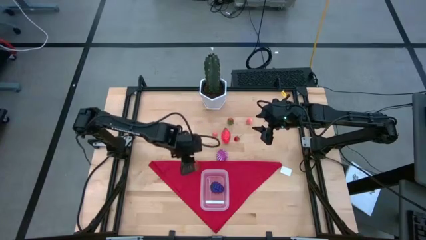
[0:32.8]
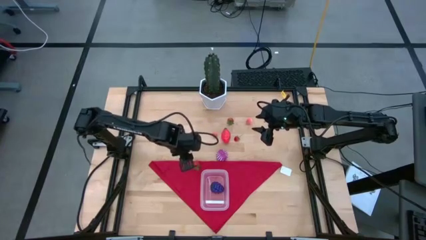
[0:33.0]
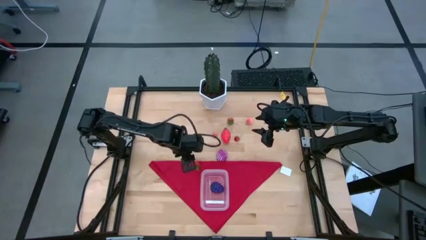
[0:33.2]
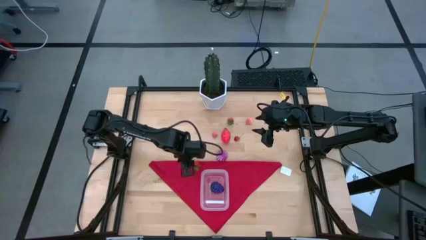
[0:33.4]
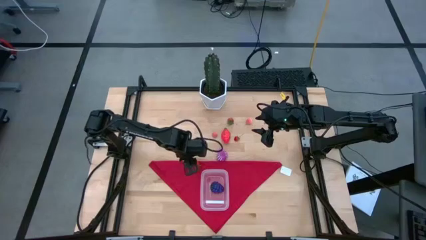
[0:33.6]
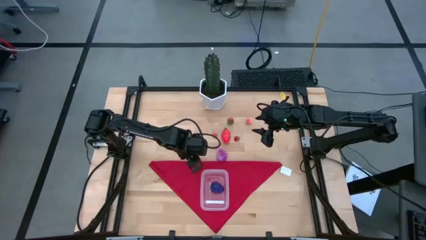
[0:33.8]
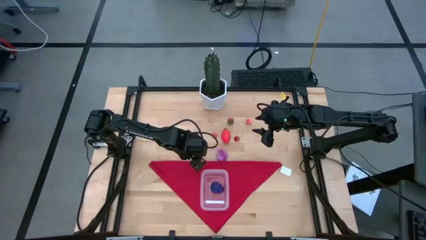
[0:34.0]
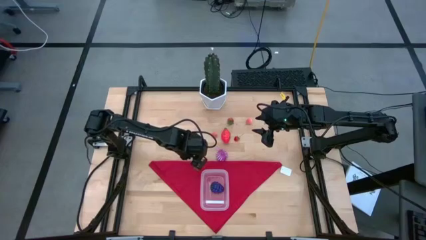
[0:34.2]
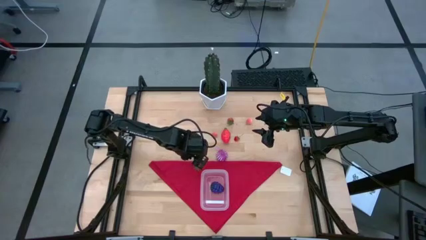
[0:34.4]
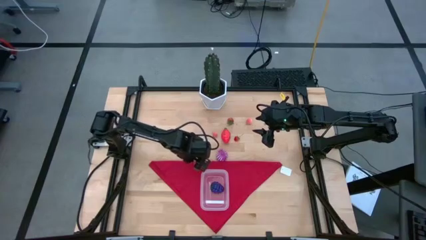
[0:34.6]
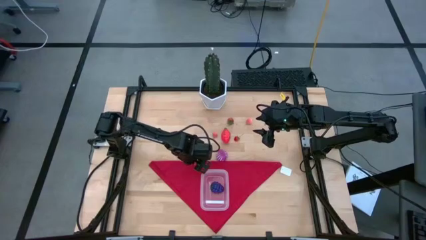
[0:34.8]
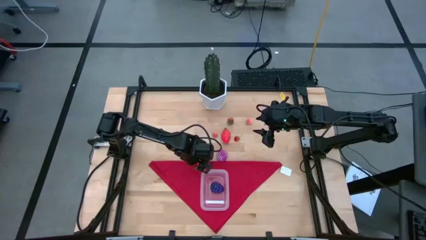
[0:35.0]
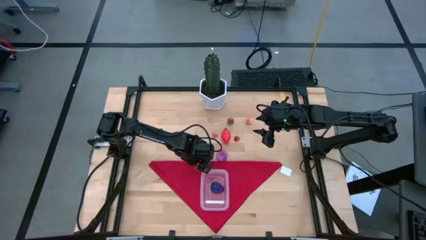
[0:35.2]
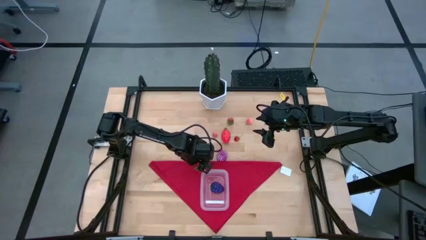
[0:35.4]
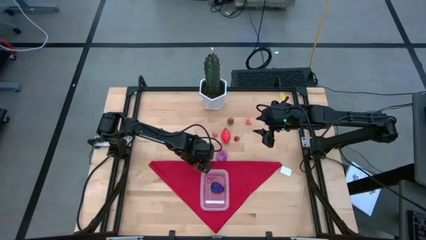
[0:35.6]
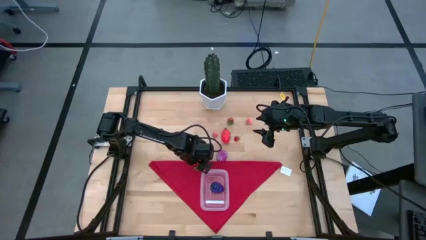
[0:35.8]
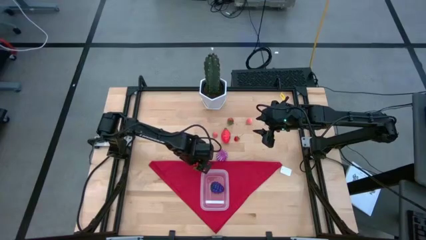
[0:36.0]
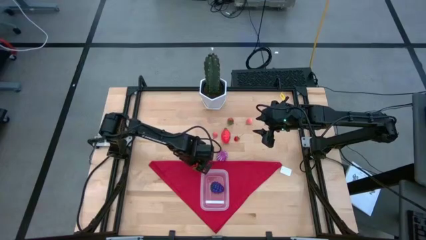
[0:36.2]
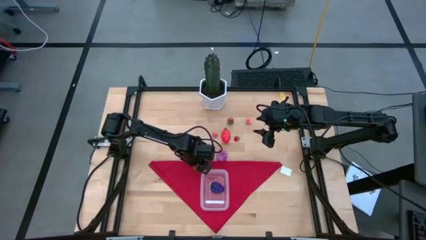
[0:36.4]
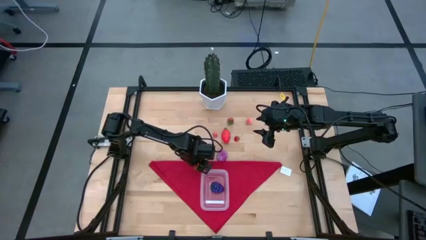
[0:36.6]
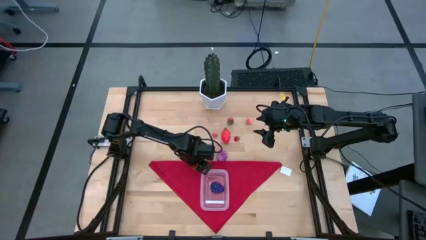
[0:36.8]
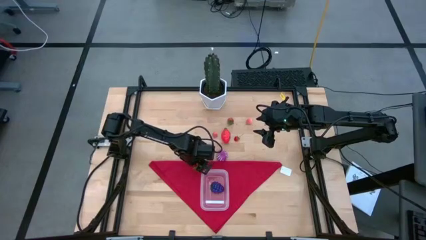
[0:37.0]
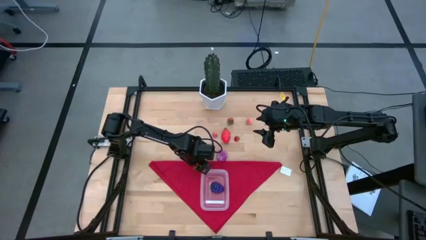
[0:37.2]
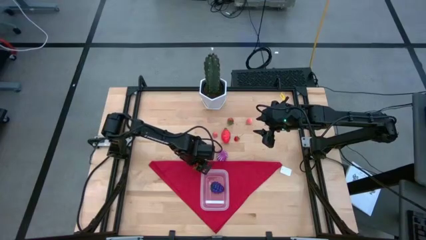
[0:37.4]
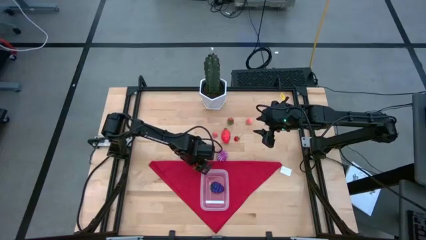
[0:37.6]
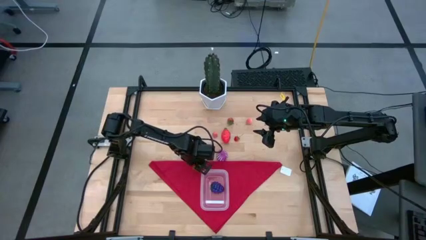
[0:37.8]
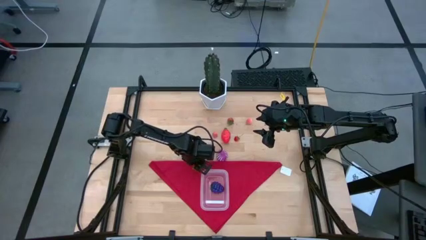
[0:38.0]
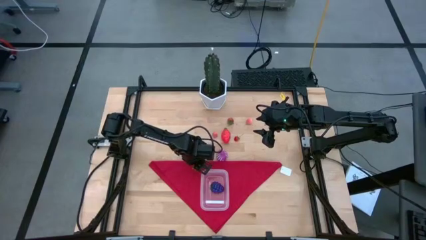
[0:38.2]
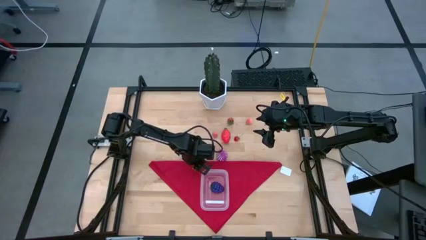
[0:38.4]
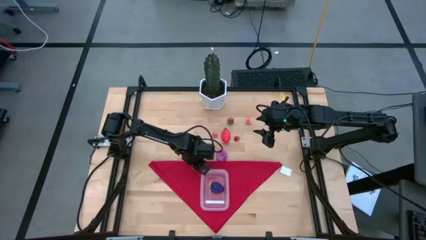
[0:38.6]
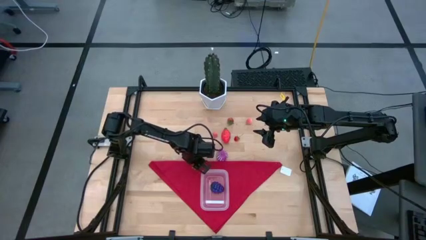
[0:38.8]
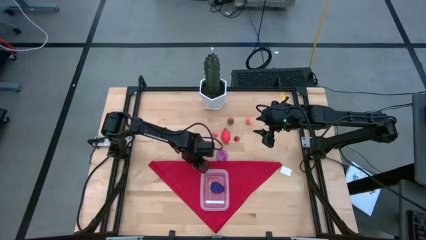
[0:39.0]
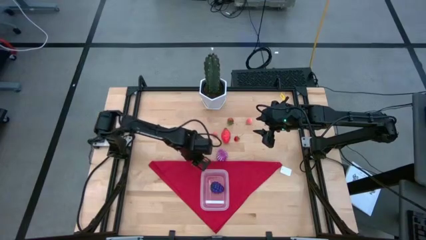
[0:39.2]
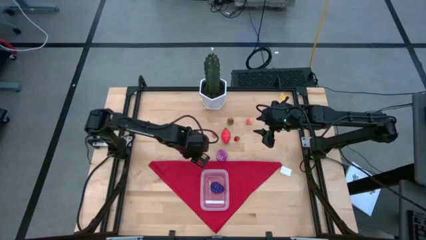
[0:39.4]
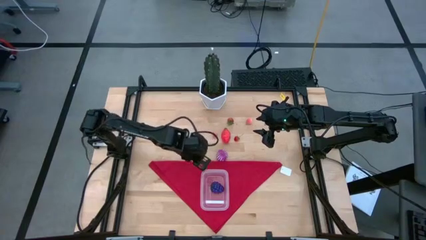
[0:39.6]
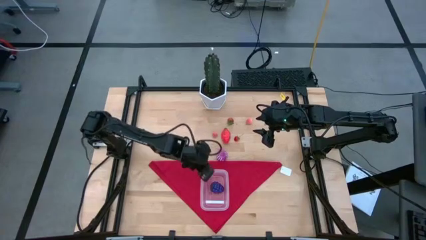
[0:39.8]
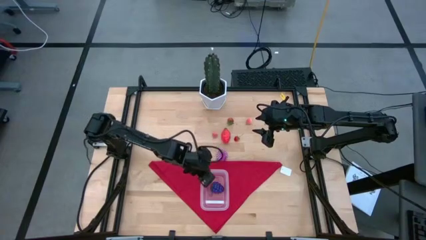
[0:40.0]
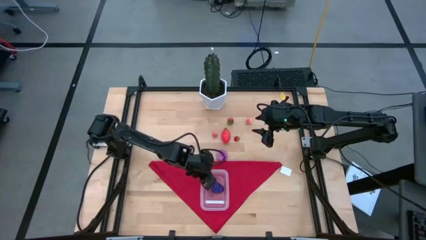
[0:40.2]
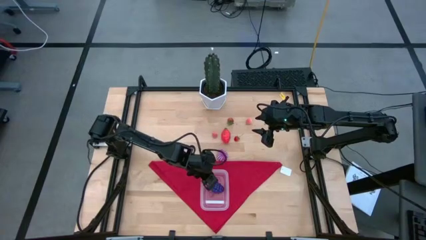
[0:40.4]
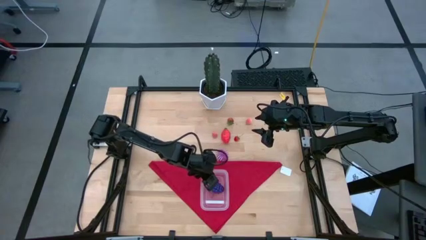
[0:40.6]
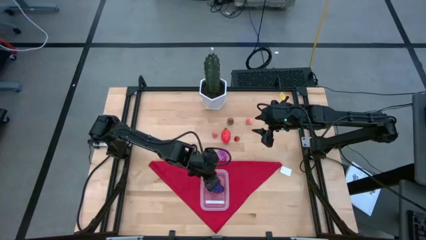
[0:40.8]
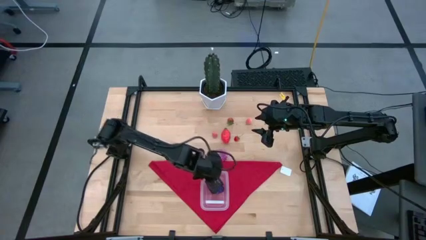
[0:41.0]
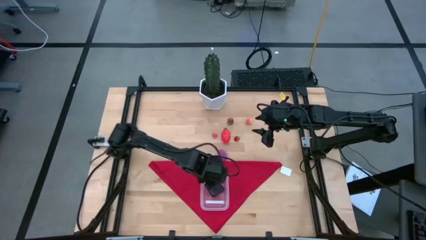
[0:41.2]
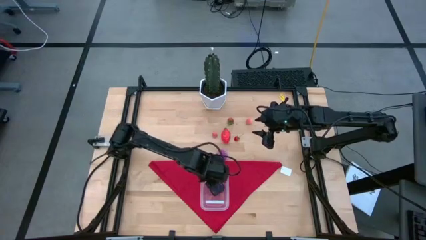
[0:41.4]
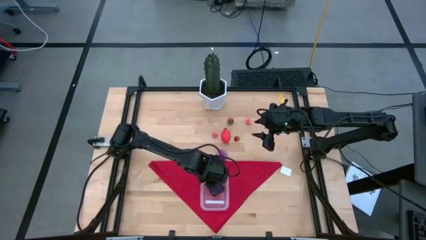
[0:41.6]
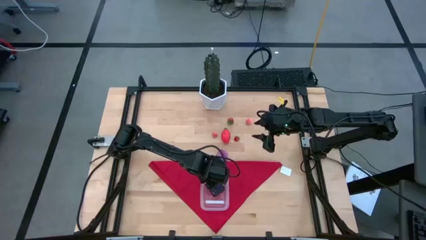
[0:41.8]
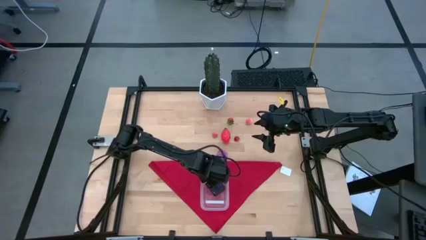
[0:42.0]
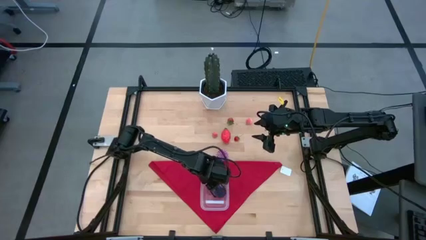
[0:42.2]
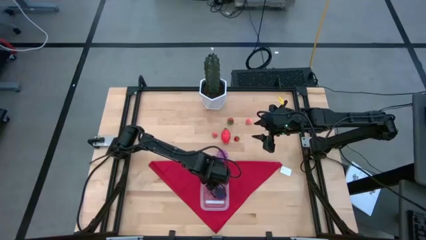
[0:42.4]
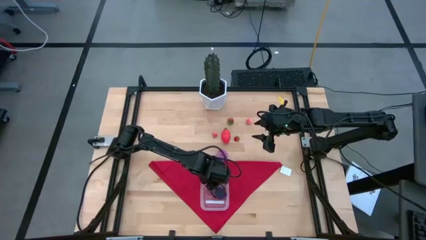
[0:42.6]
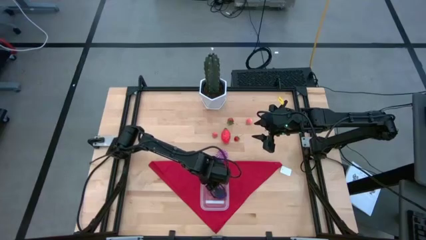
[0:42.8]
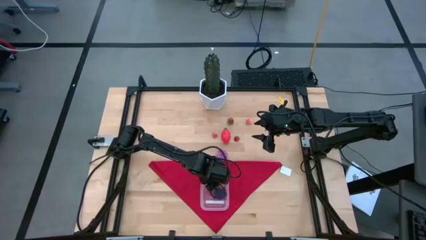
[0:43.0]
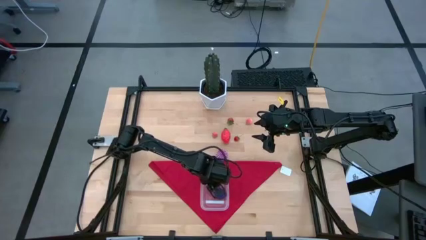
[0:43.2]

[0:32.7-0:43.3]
Task: Pick and placing Produce into tupperware
Put the left strawberry into the transparent bin
